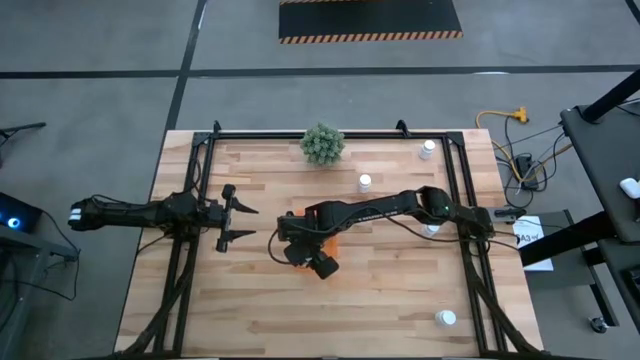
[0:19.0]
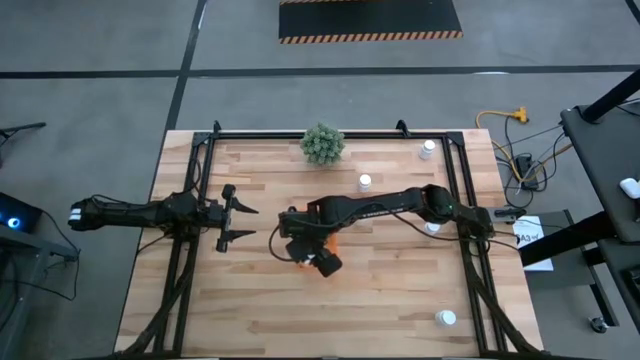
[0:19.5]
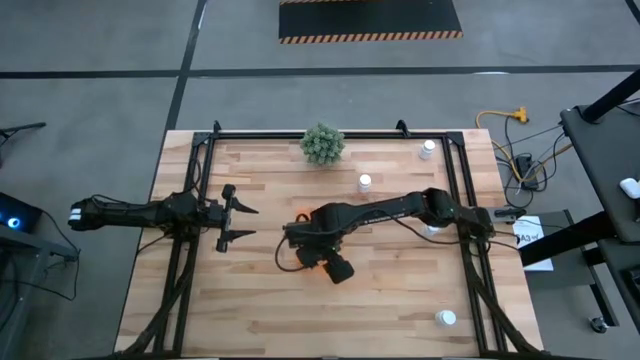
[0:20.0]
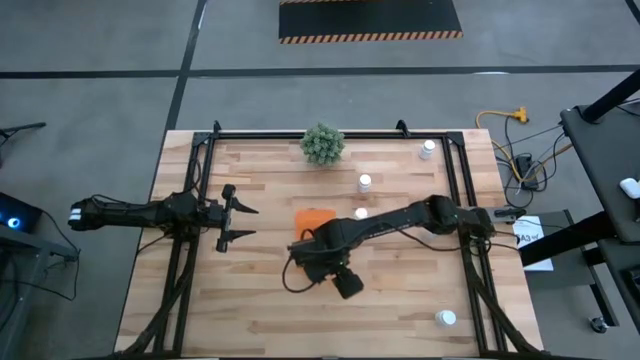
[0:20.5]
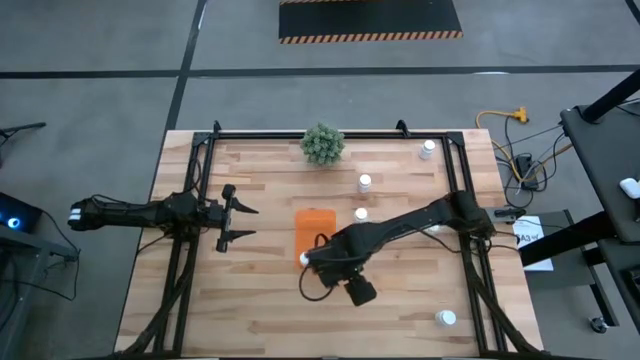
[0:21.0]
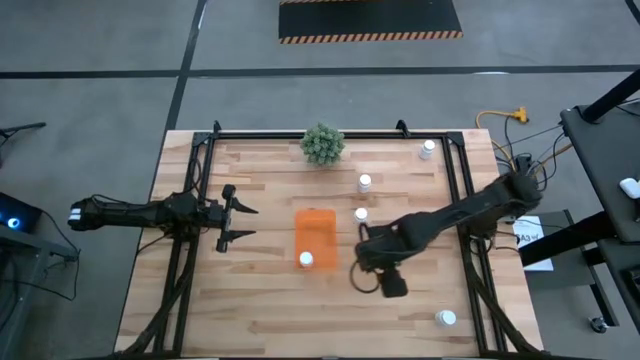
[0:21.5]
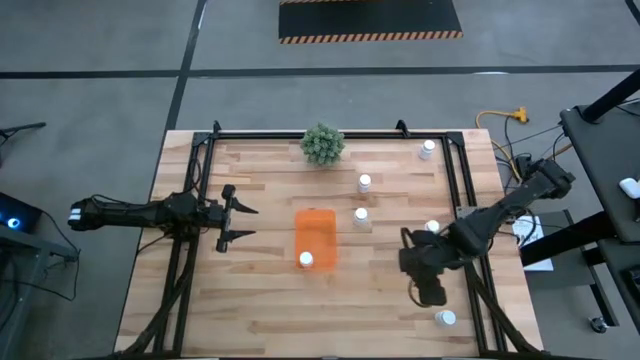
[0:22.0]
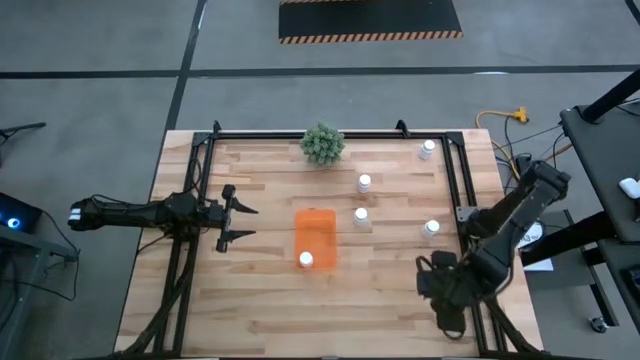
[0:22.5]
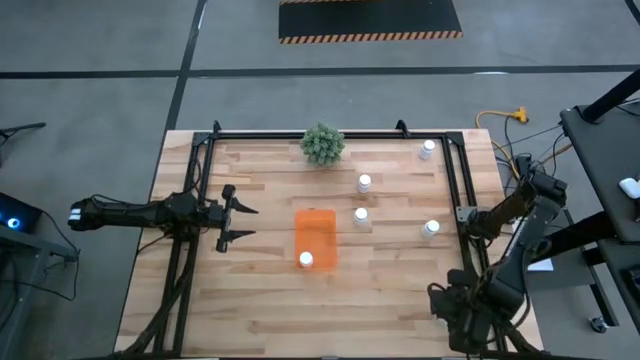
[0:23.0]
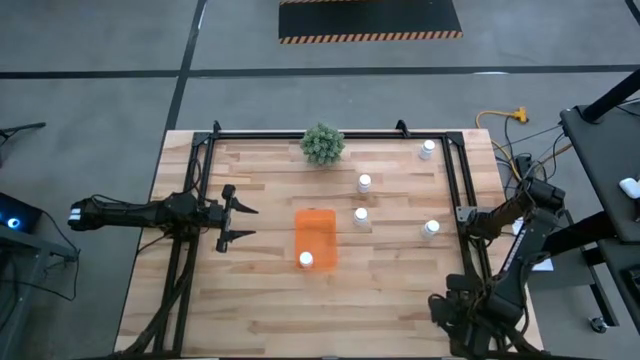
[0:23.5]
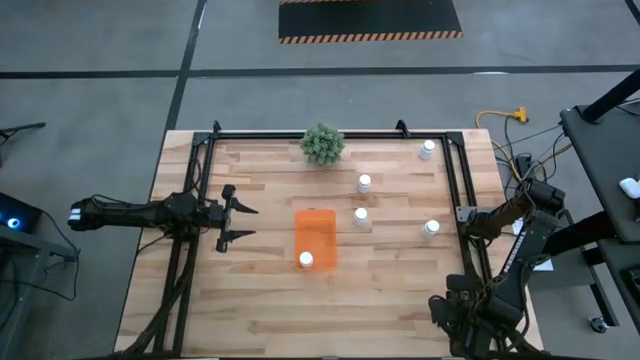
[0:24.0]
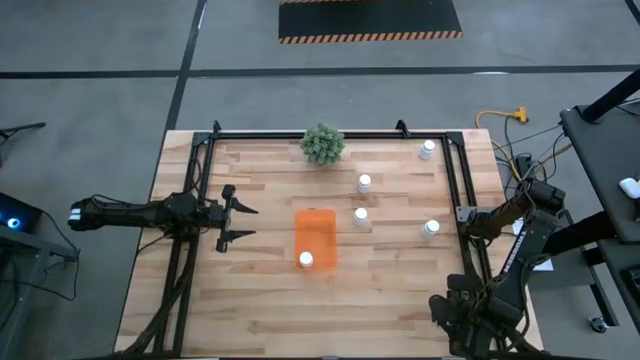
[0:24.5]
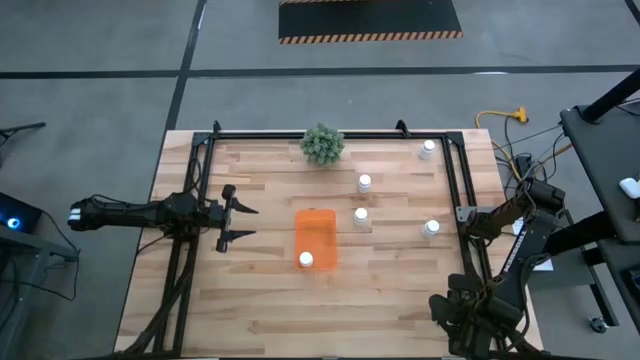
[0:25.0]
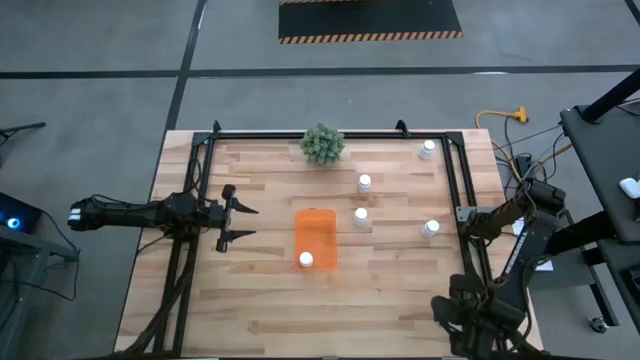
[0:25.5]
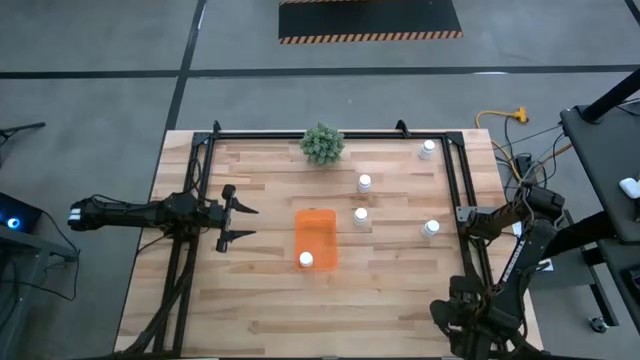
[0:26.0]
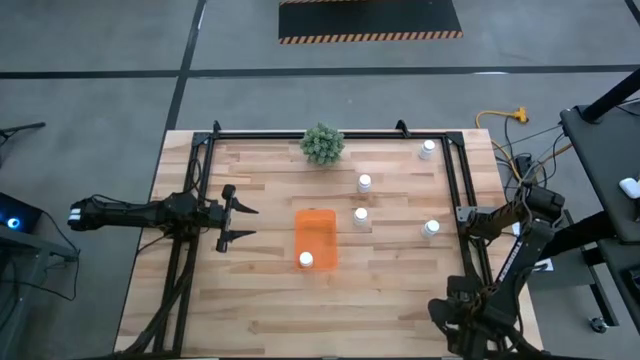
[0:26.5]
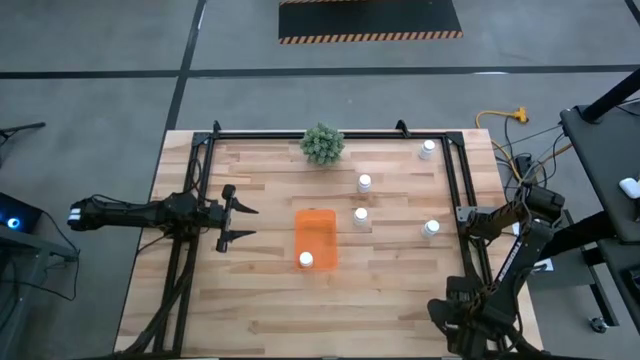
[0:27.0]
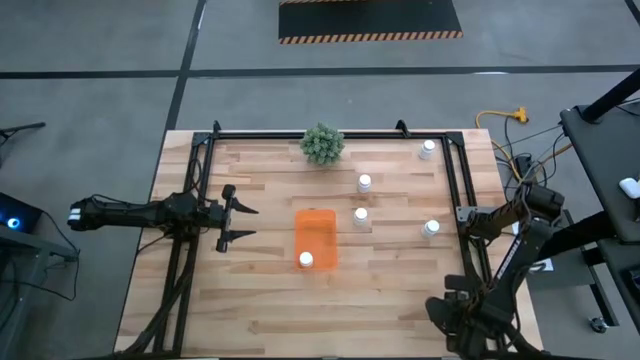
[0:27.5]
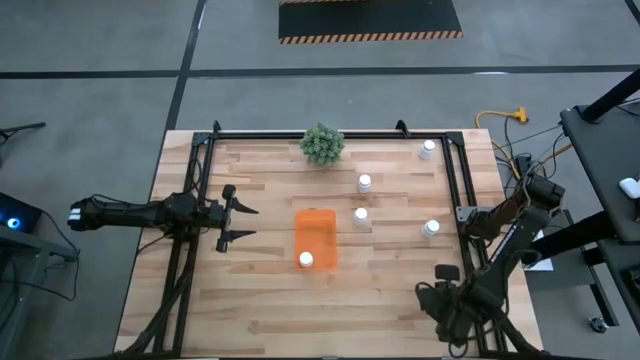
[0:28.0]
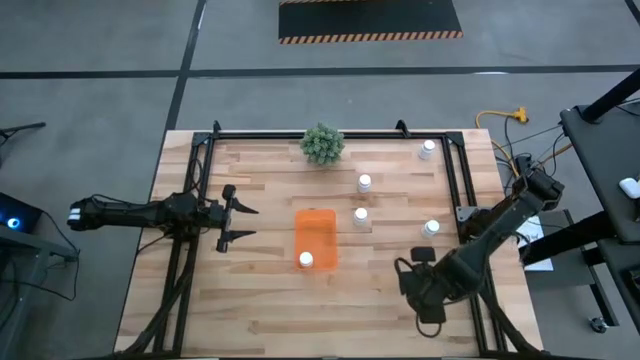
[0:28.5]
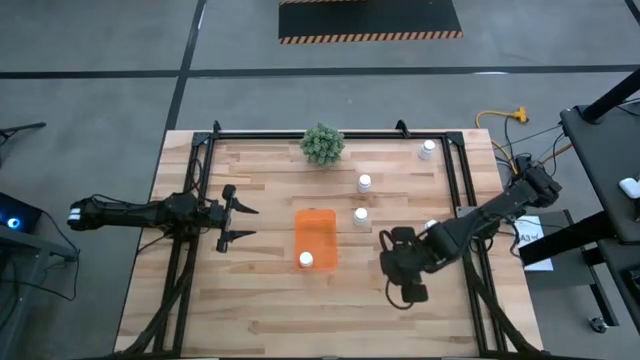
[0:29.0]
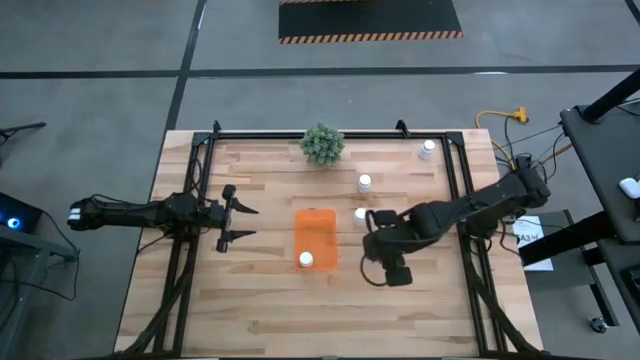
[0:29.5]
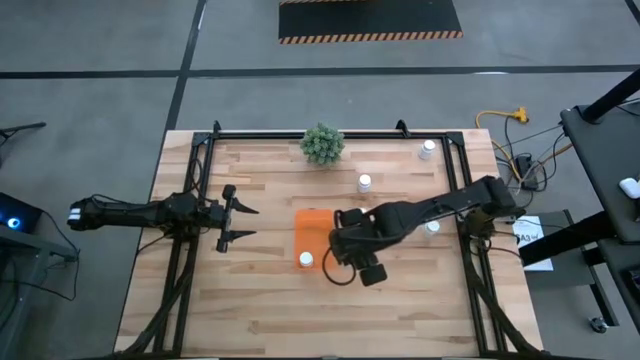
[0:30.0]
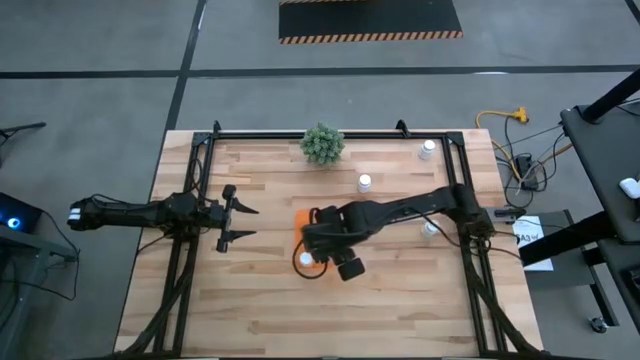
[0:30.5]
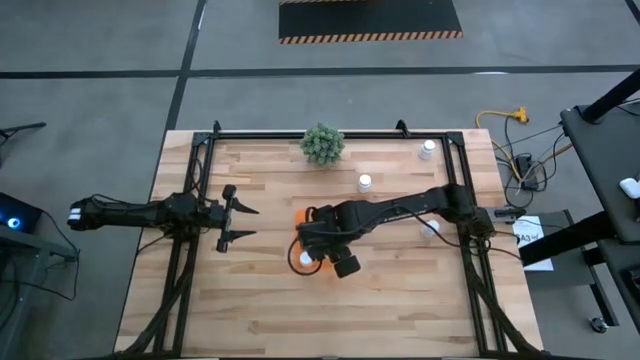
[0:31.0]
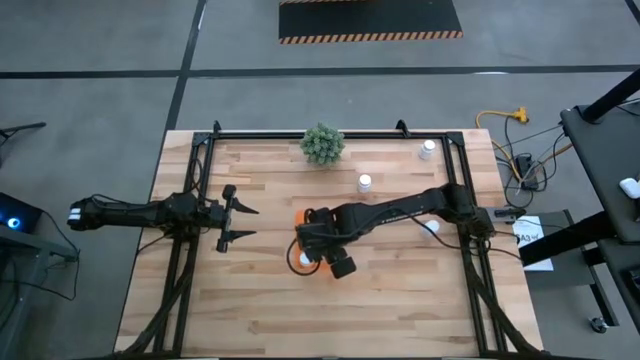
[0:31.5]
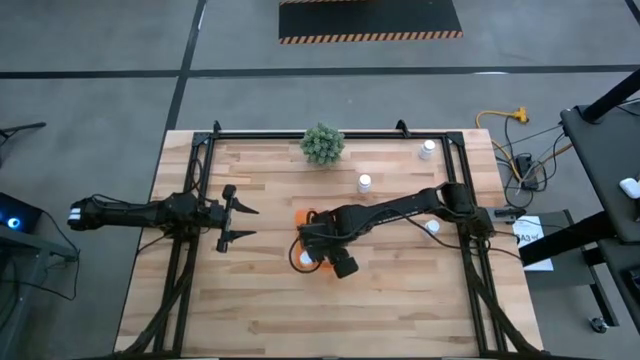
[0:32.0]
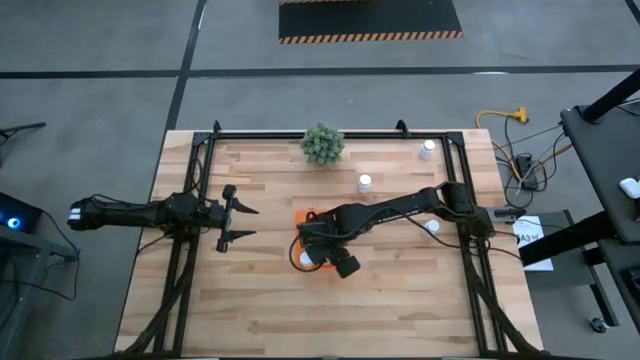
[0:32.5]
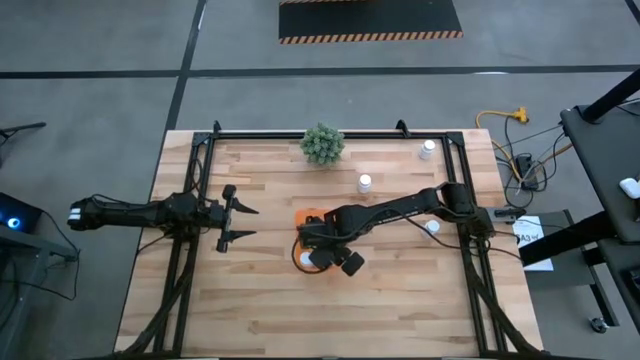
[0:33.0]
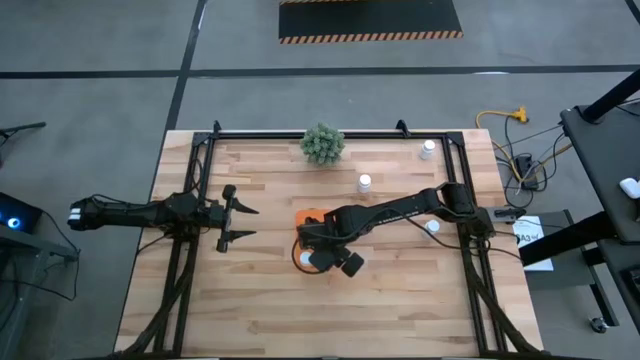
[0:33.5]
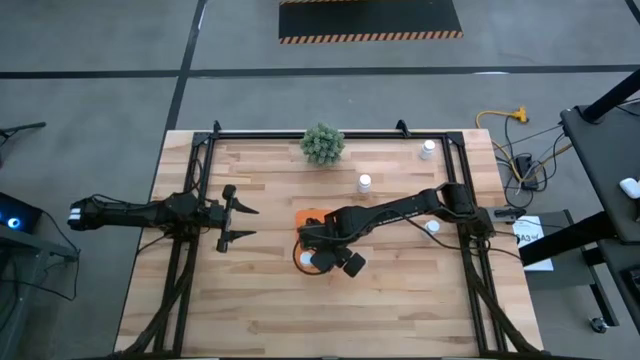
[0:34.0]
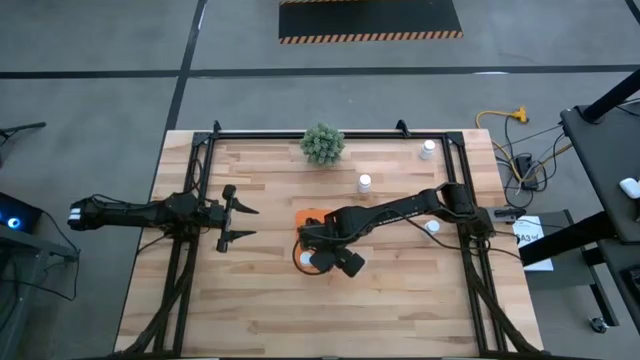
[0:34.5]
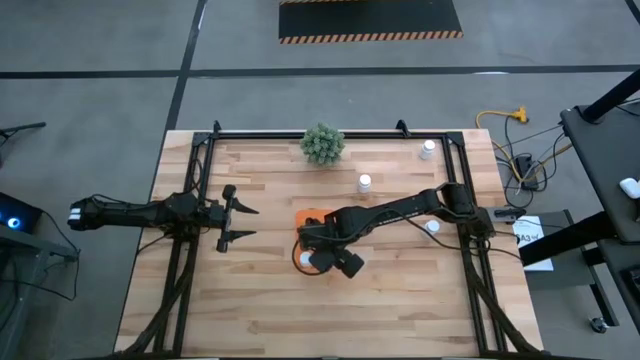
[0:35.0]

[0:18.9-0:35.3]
Task: Pick and place pill bottles into a basket
Put the white pill bottle into the orange bin

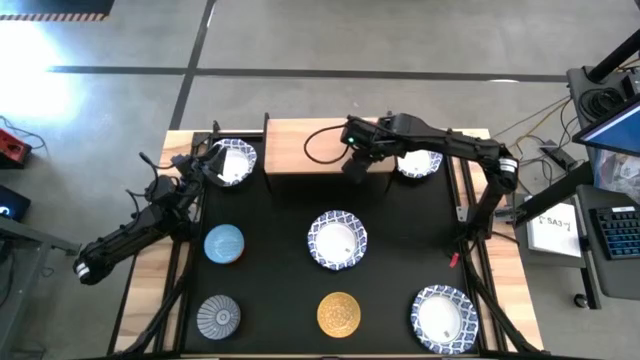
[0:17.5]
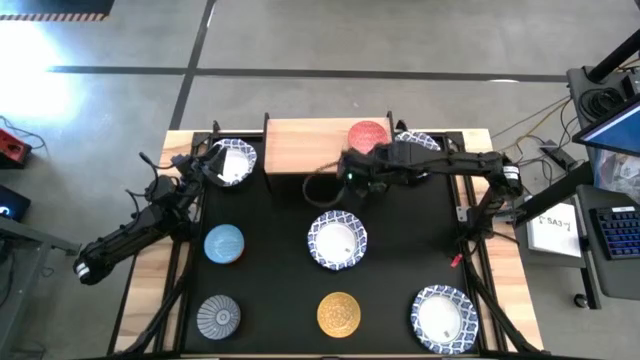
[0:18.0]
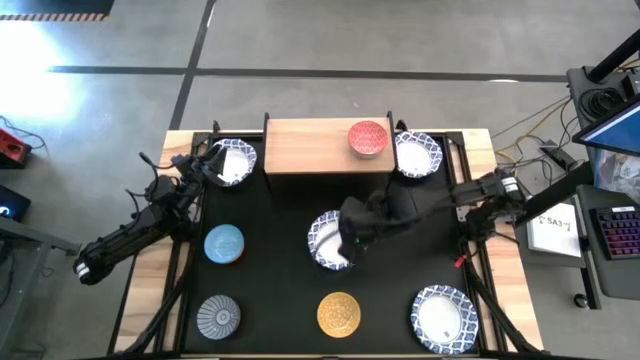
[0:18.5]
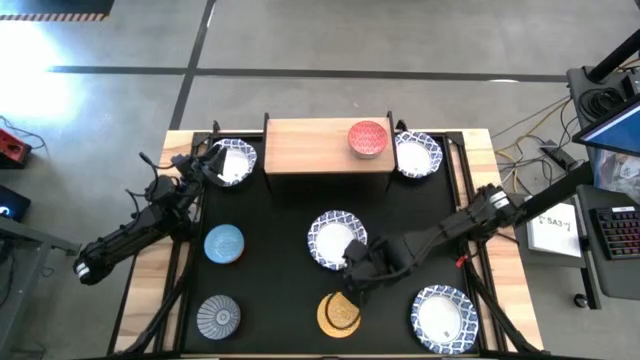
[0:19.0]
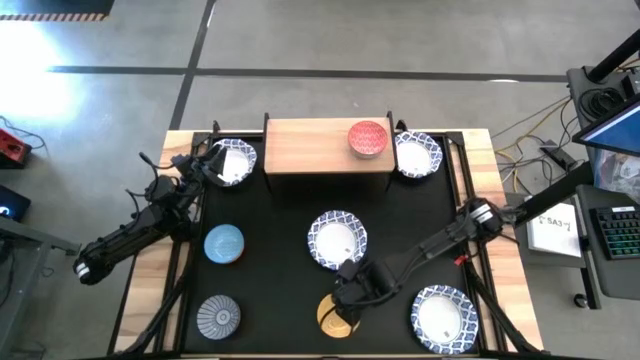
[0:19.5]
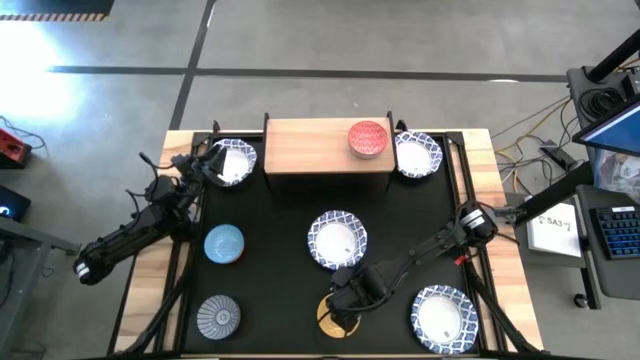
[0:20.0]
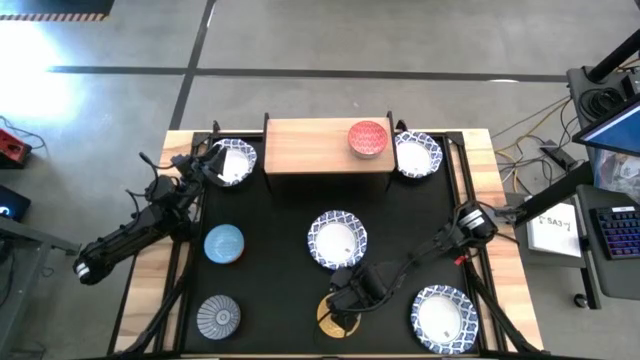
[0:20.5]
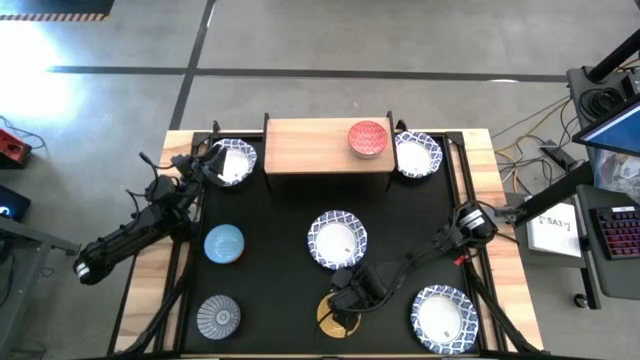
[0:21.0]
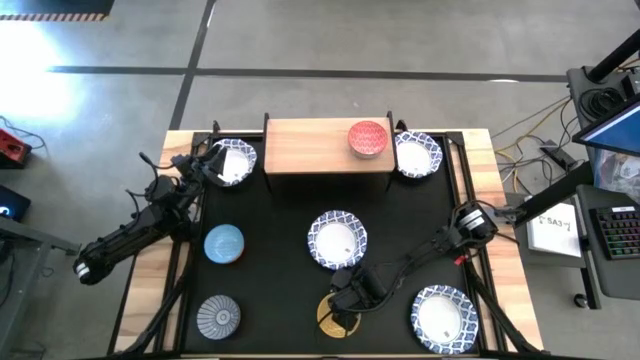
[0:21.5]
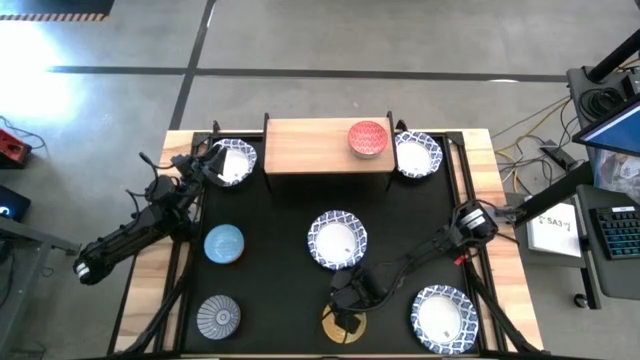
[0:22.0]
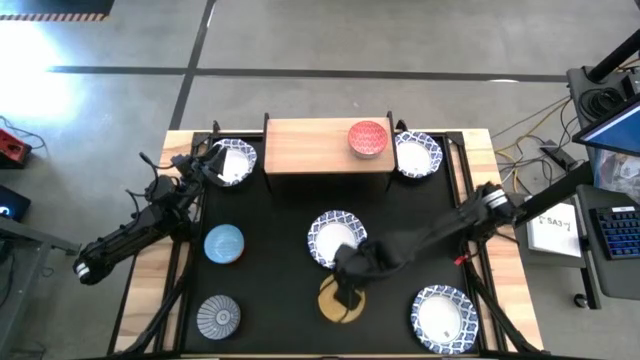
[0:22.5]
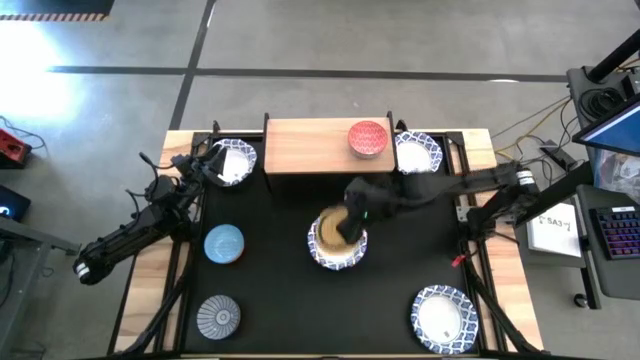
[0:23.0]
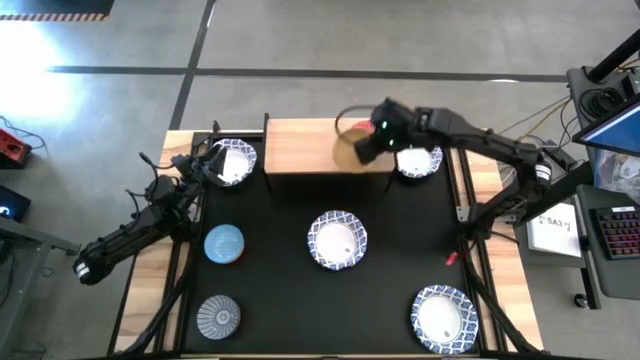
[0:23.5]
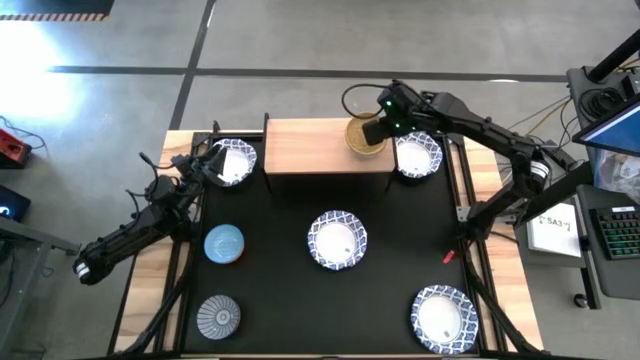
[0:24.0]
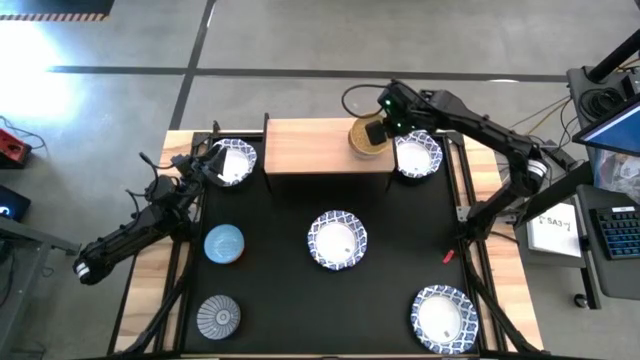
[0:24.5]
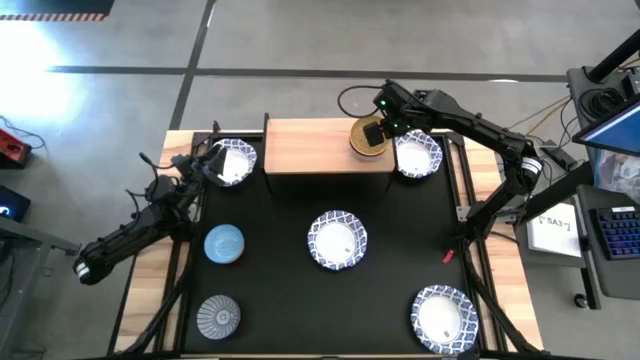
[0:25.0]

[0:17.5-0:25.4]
Task: Place and stack bowls onto a shelf
Stack the yellow bowl on top of the red bowl on the shelf
